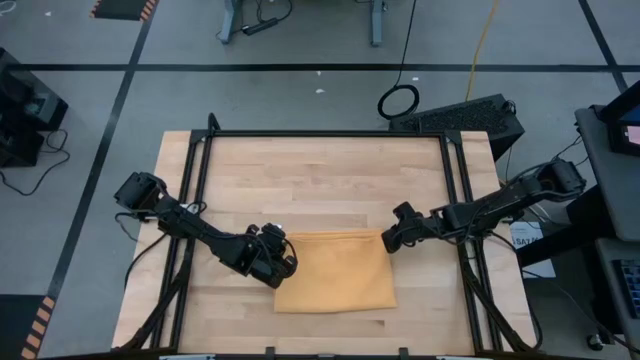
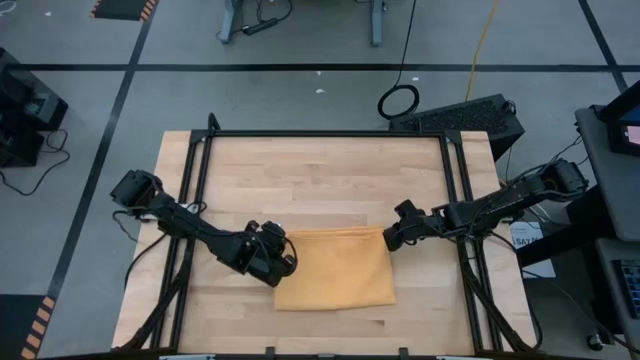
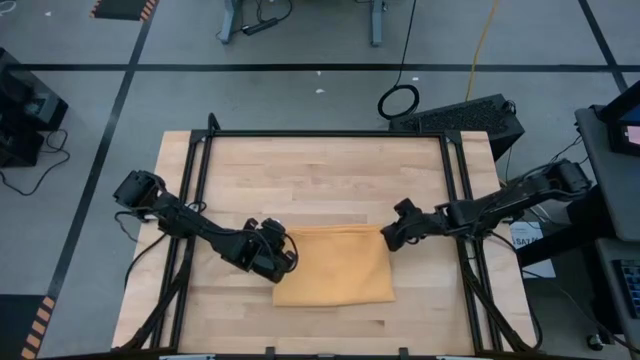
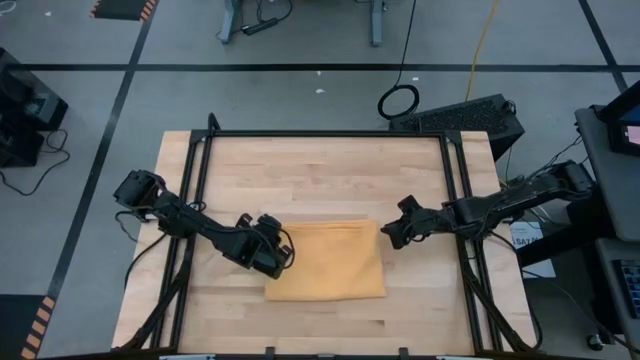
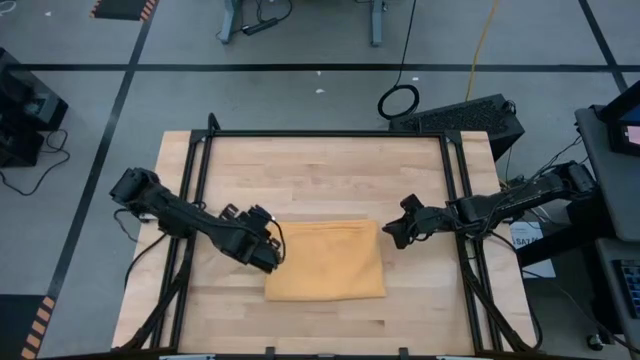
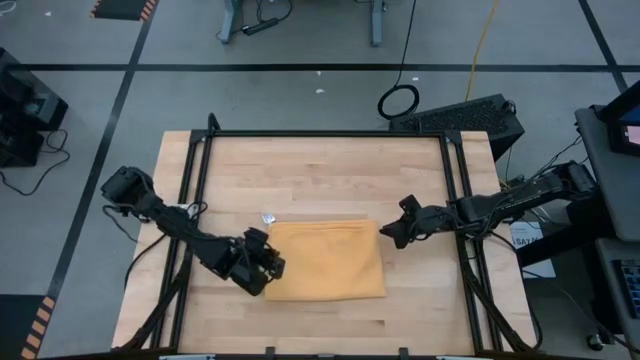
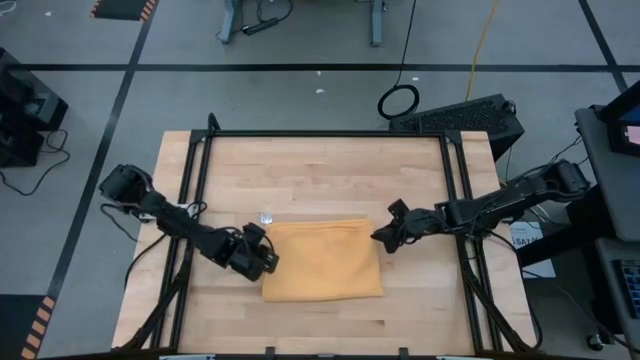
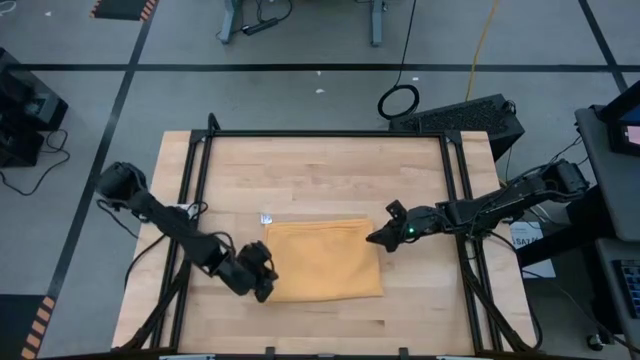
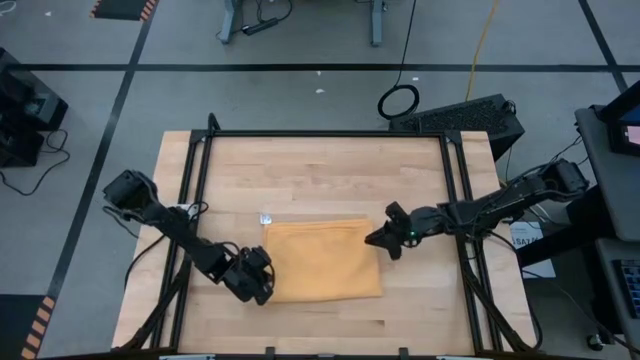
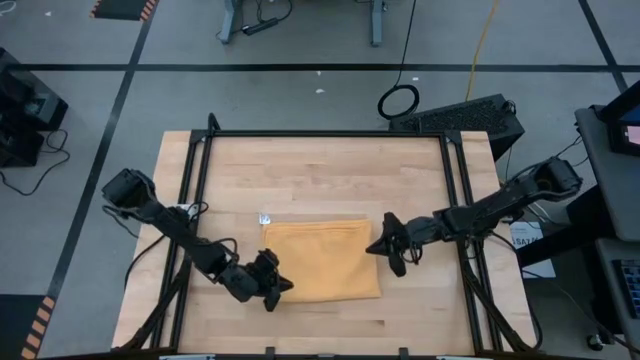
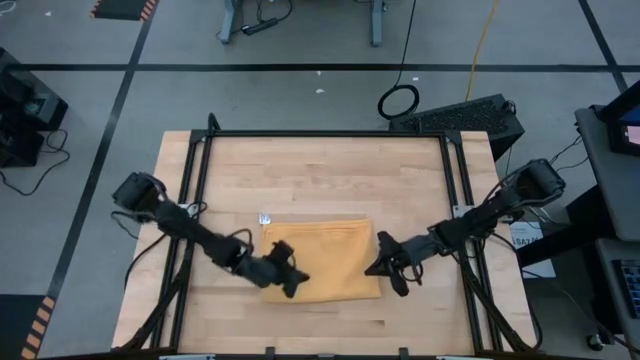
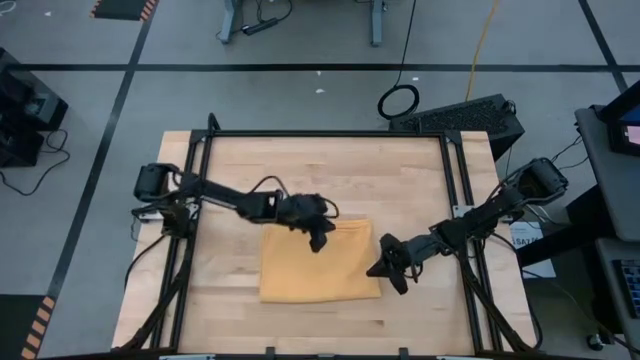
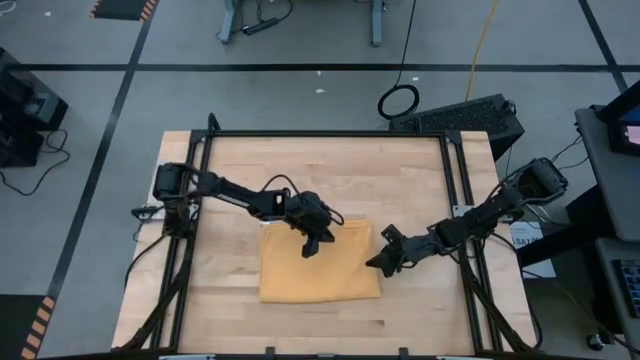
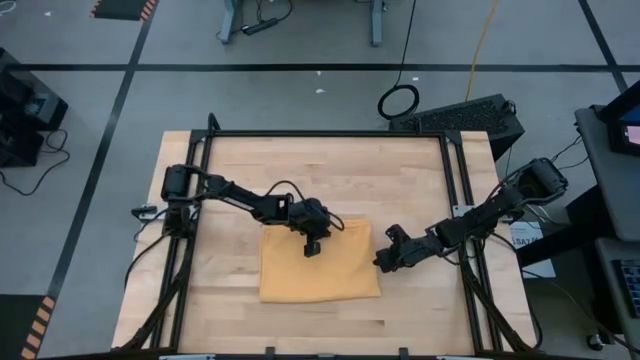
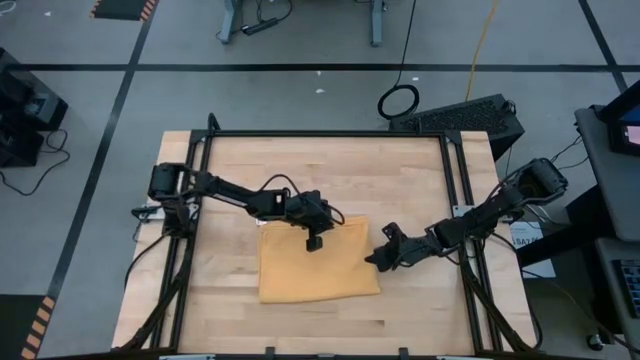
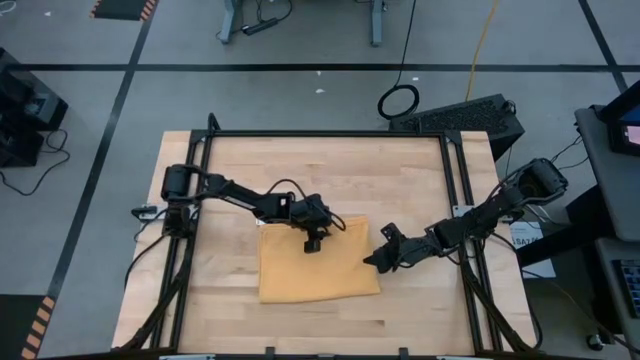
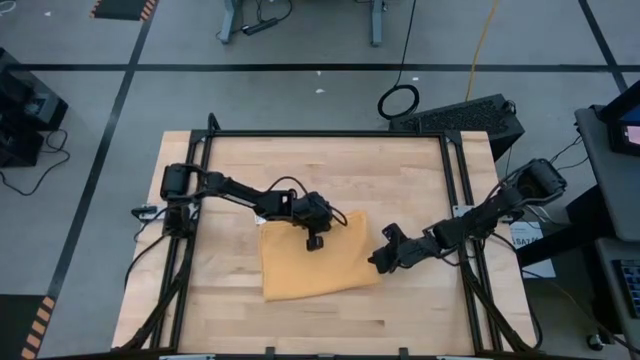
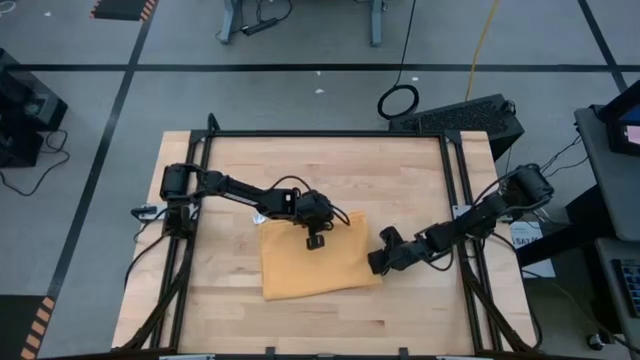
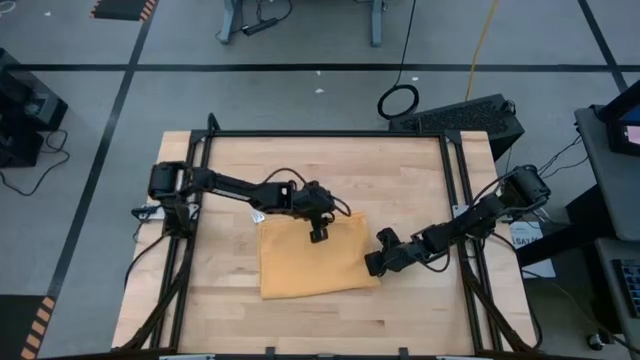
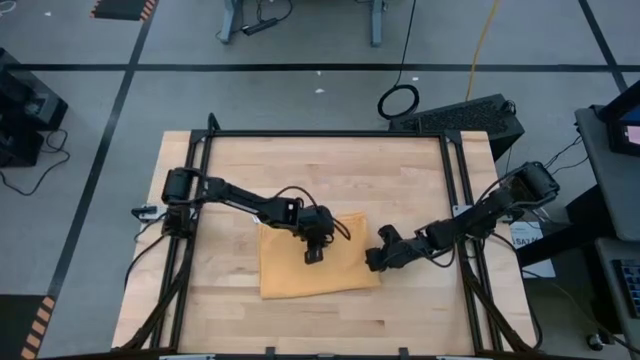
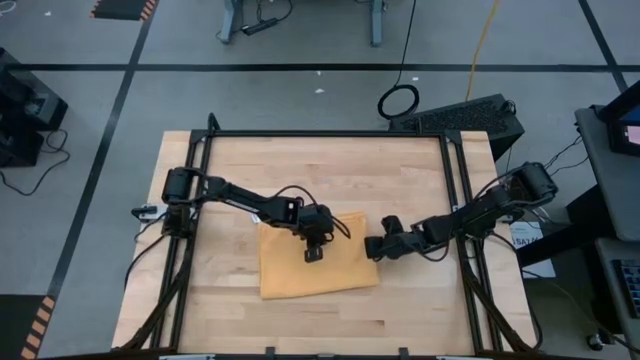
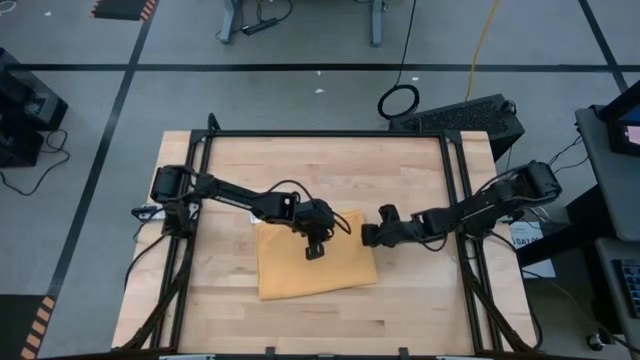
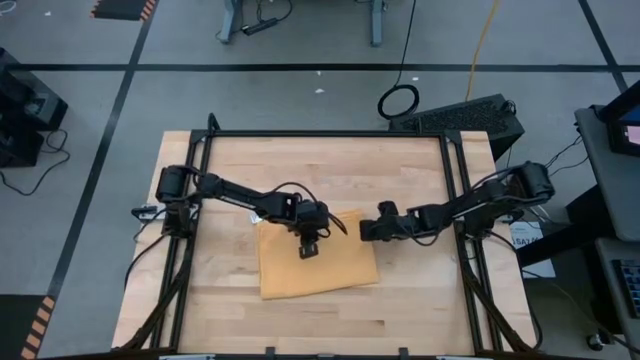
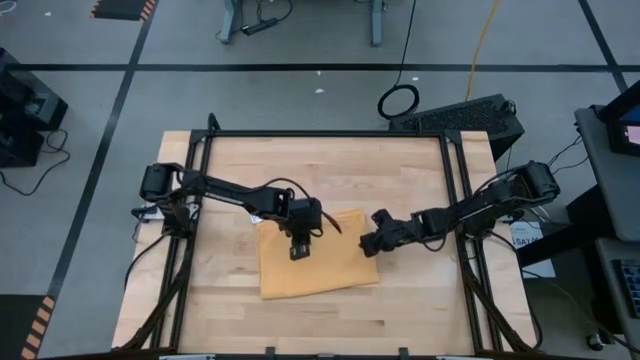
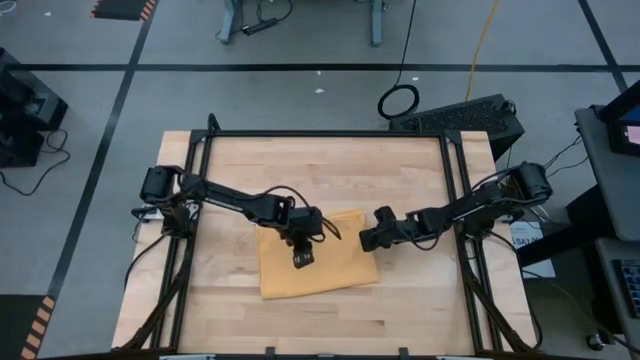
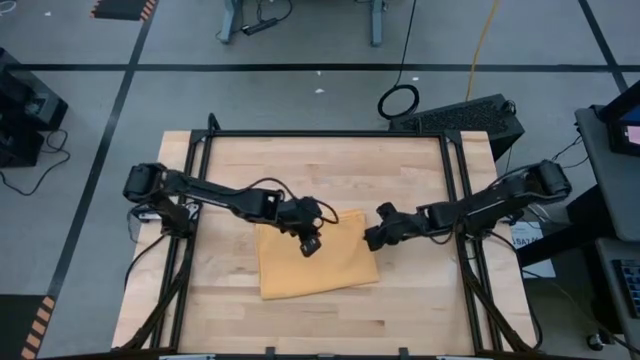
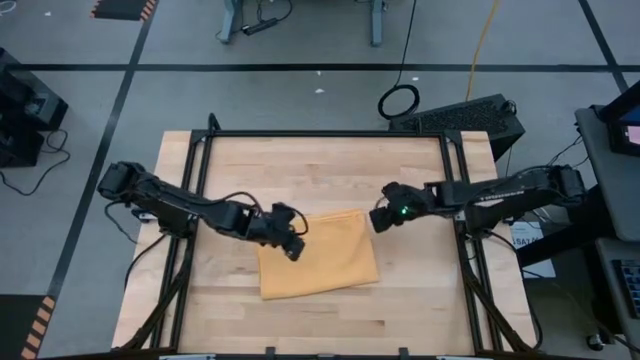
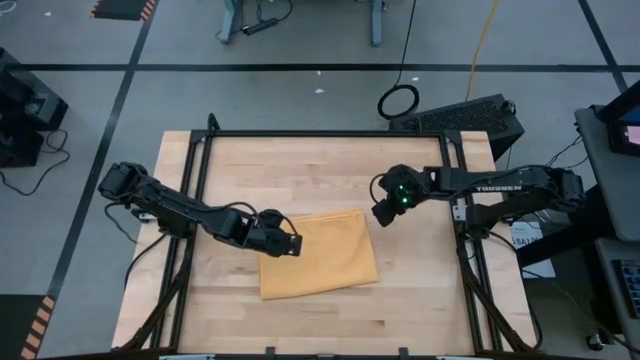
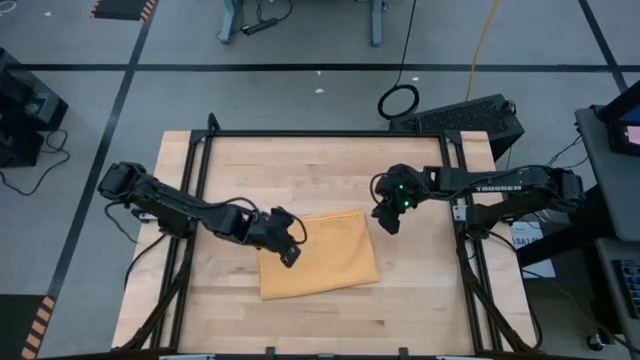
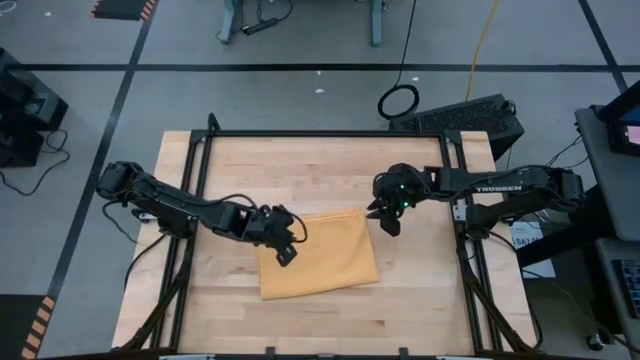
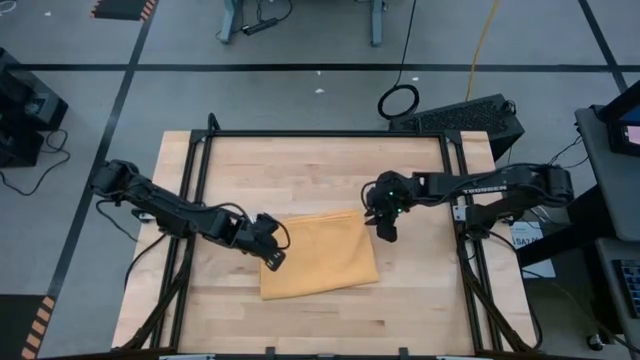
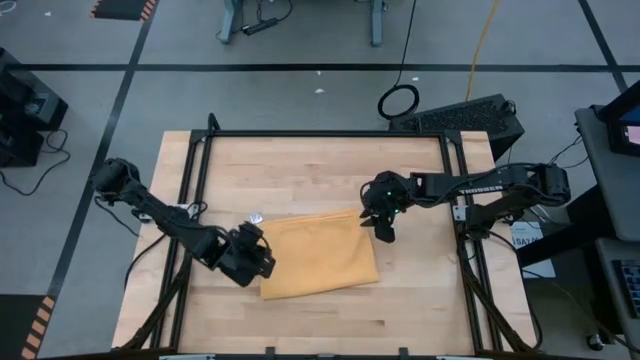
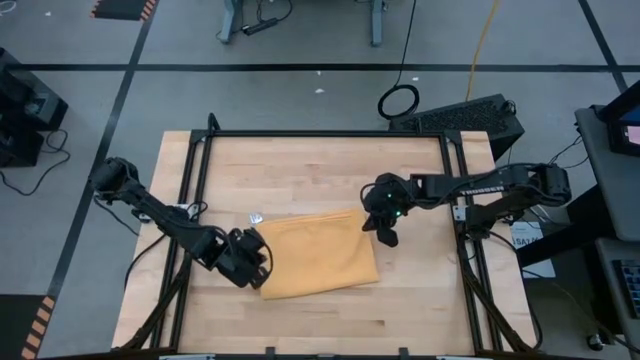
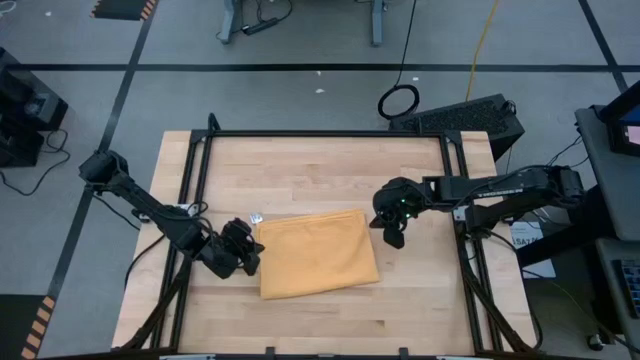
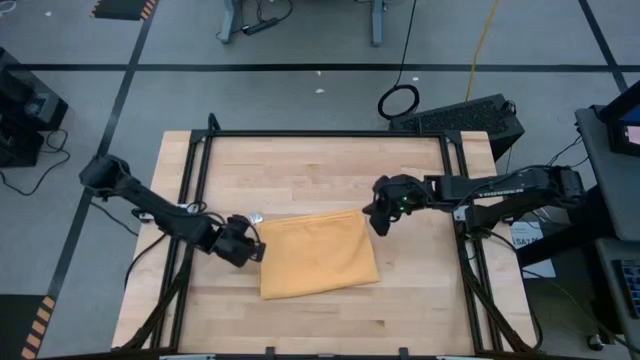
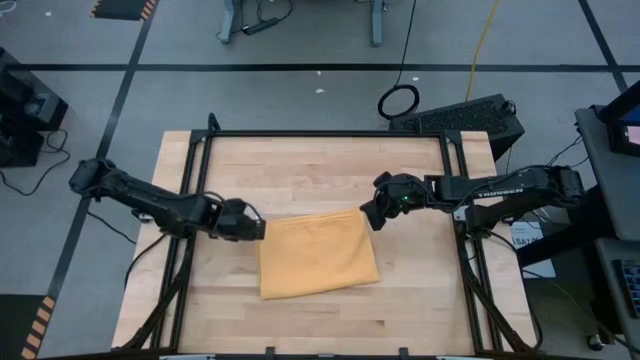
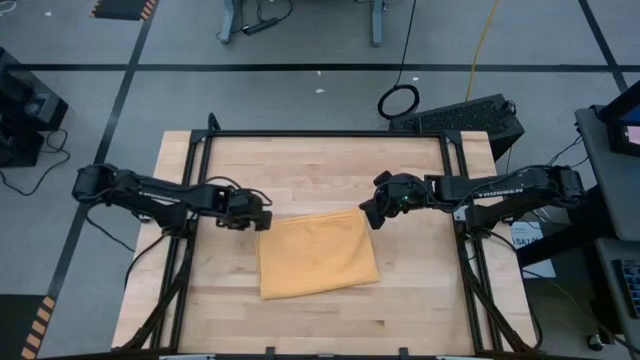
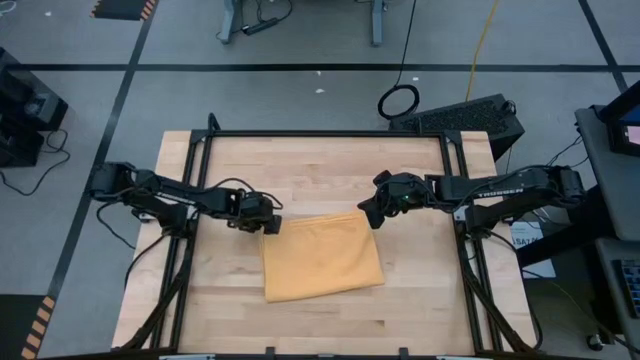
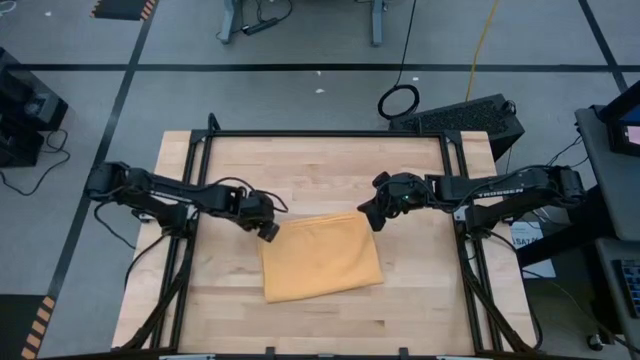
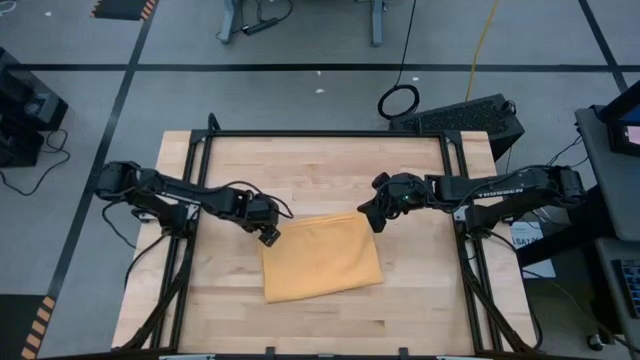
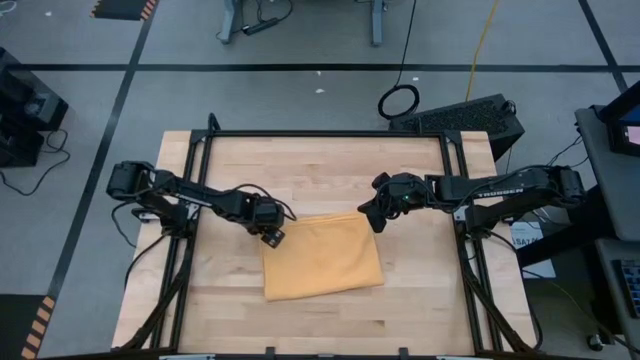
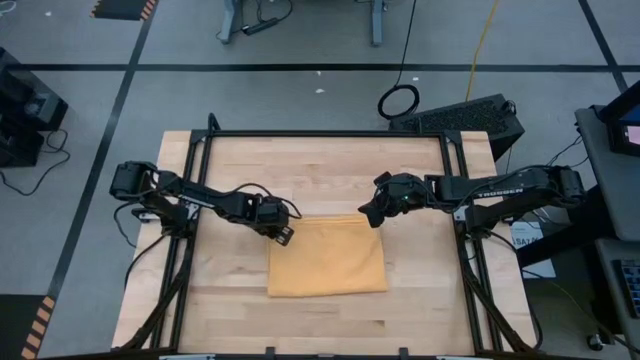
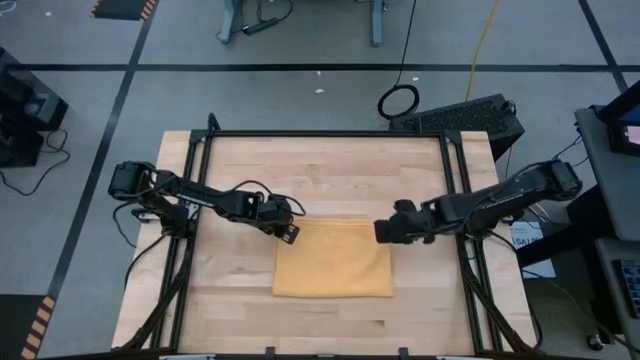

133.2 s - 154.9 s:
Task: Roll towel
Fold the yellow towel in
